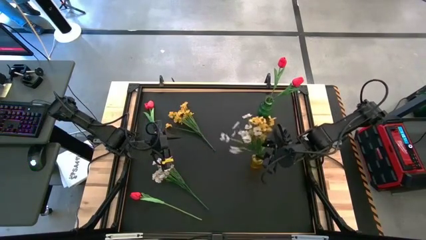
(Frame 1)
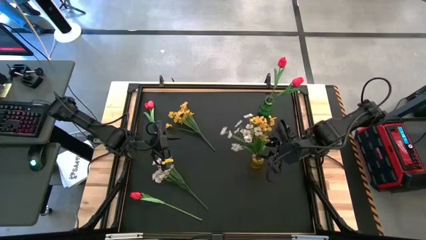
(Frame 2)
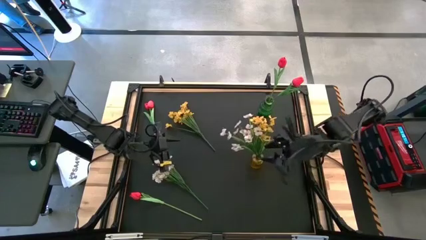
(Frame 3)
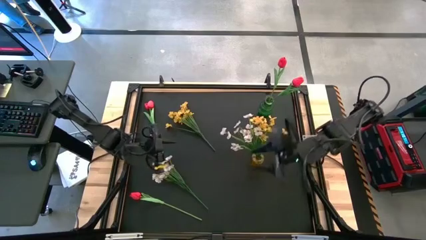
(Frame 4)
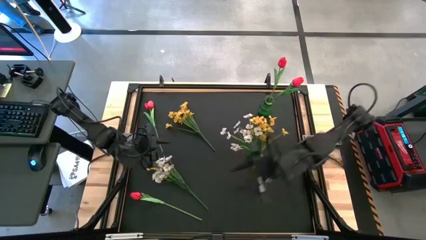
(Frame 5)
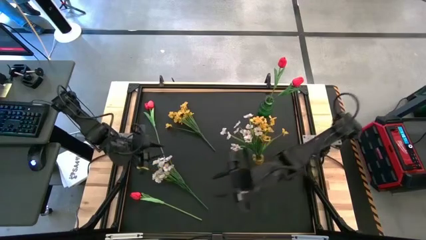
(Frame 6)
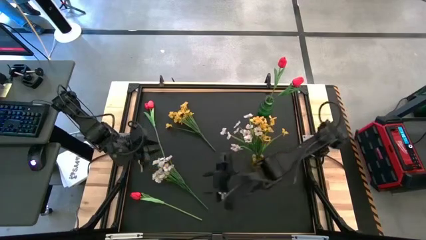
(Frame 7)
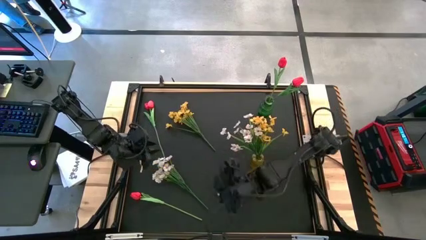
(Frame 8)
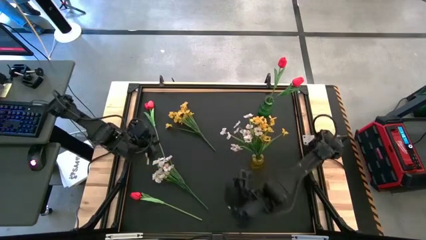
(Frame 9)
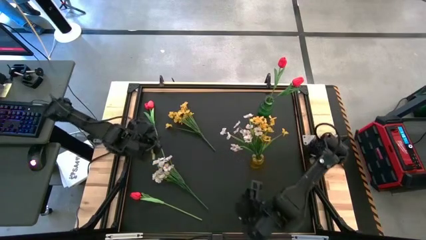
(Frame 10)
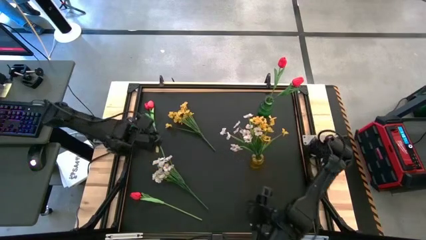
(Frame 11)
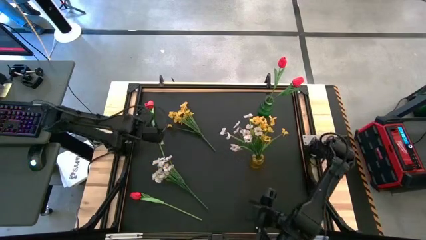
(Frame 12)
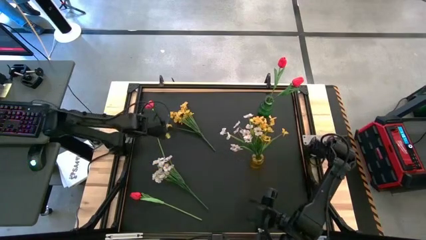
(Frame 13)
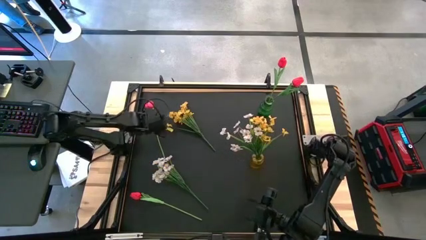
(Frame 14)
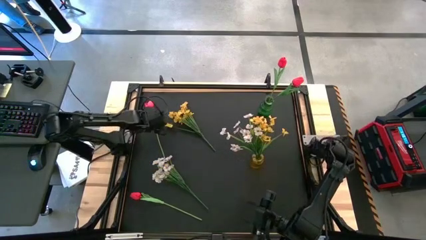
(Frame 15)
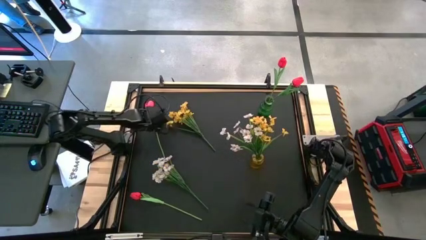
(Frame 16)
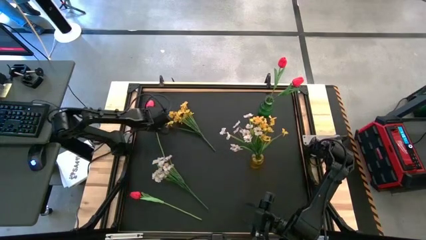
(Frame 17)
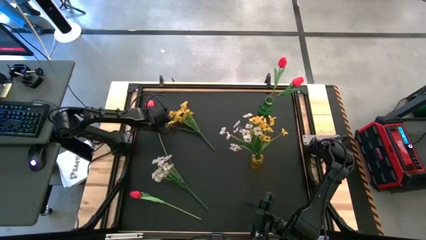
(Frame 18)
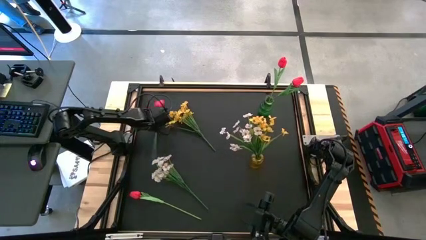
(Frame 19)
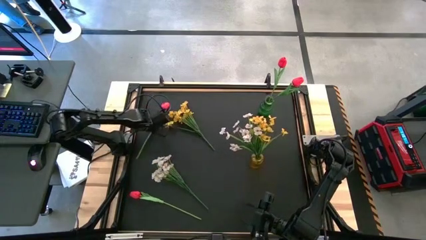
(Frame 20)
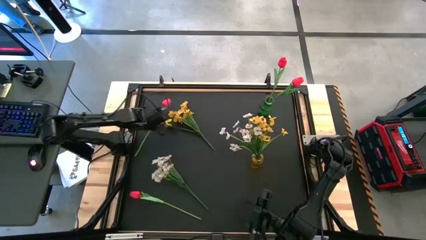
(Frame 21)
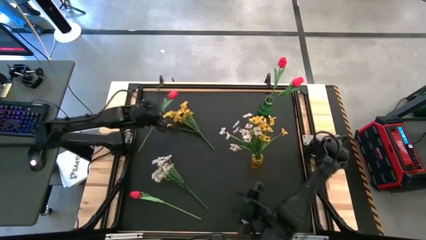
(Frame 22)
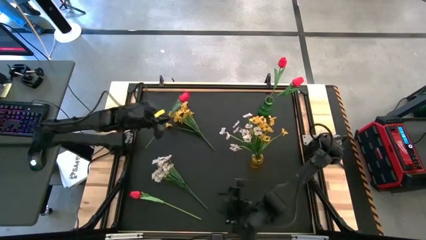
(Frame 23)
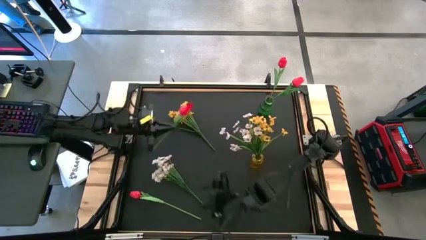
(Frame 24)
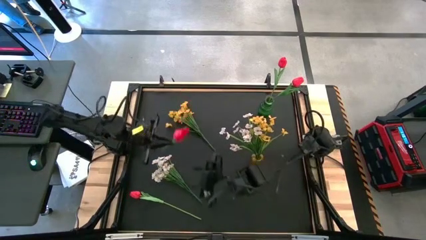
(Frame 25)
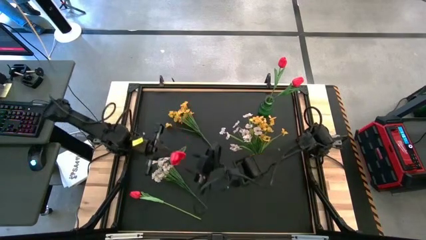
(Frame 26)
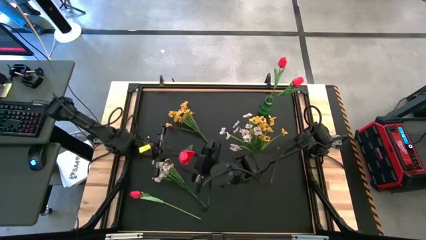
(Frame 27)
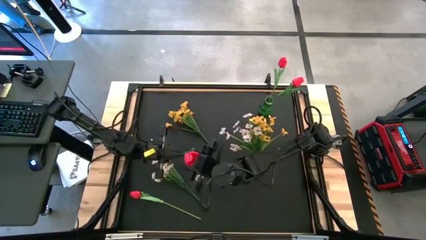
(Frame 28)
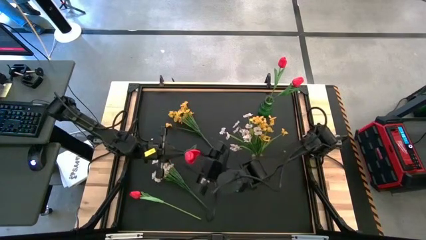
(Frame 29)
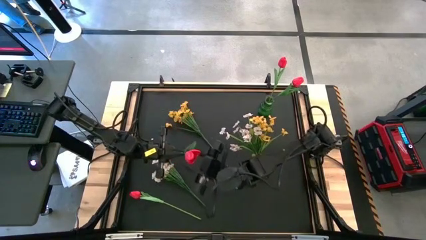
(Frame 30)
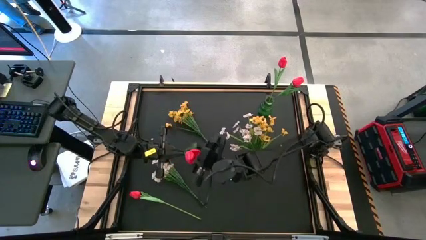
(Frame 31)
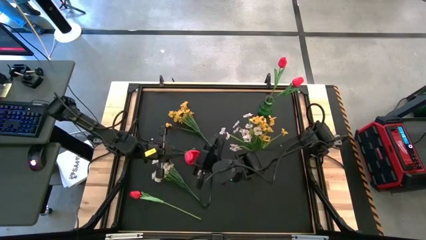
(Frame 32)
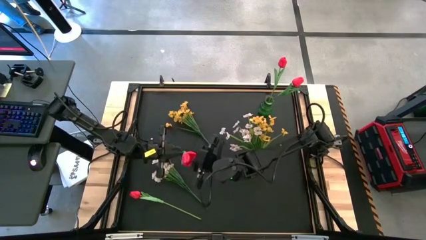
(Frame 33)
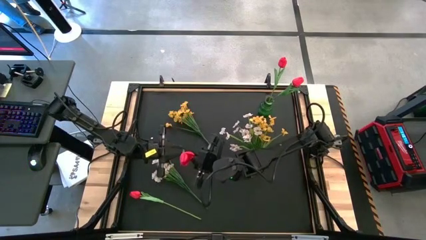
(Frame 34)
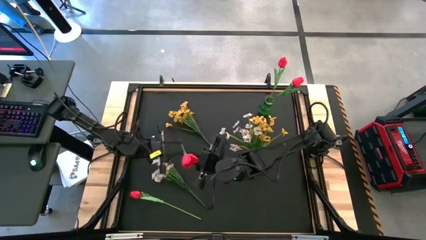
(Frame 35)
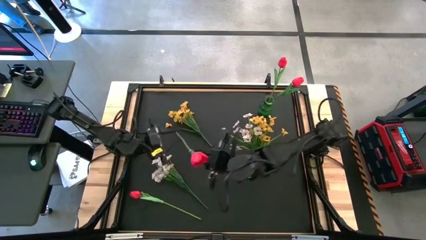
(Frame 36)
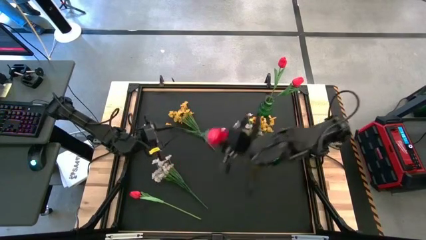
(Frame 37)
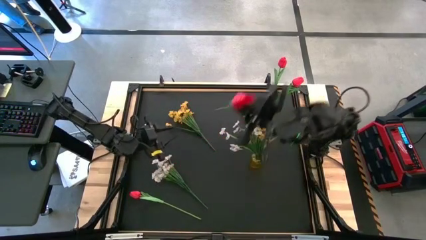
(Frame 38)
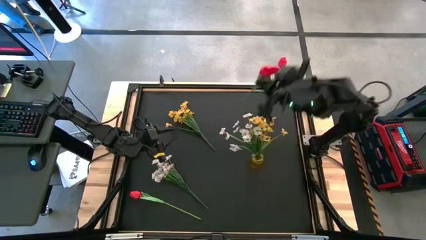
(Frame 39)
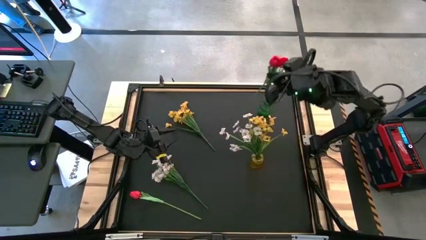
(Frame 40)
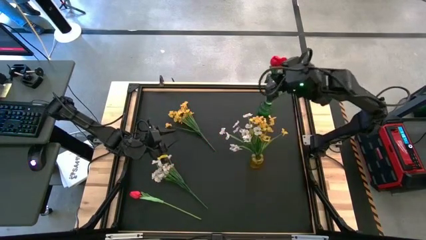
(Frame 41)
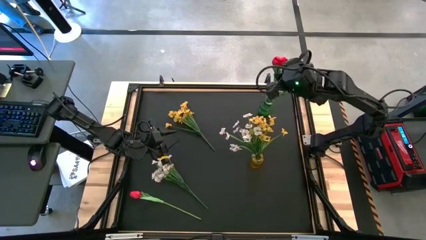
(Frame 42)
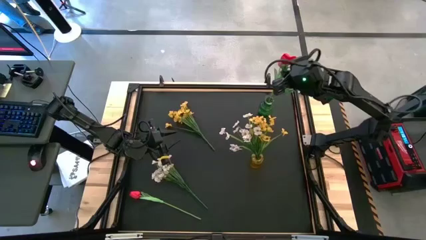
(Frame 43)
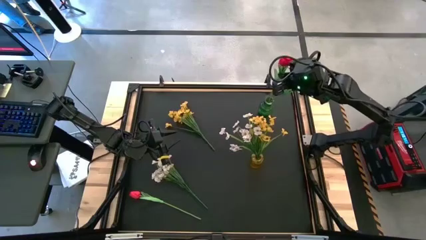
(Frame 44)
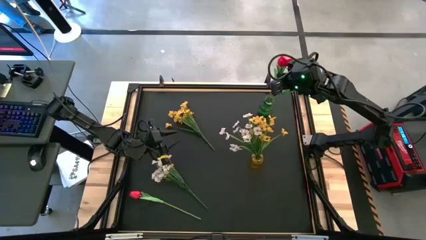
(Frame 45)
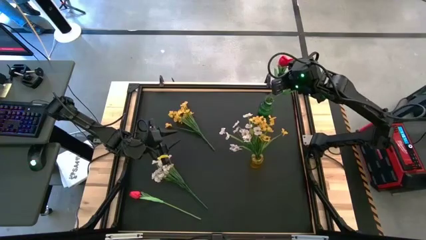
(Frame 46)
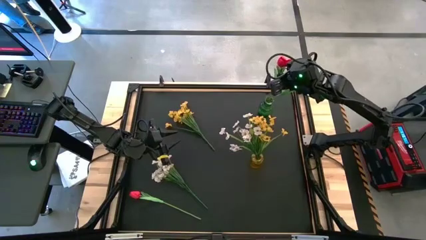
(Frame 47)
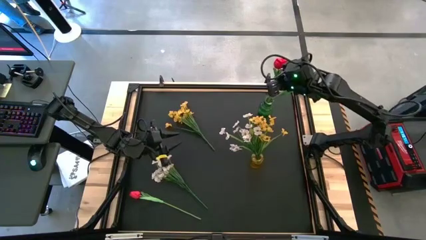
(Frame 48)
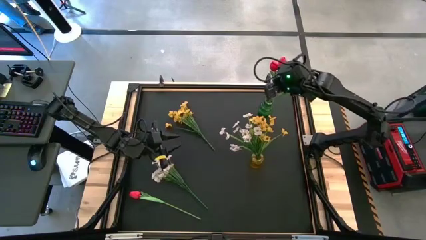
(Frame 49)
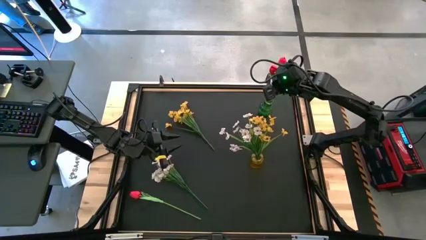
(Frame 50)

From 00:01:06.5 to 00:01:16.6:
Task: Sort flowers into vase by color
Put the top red flower into the green vase

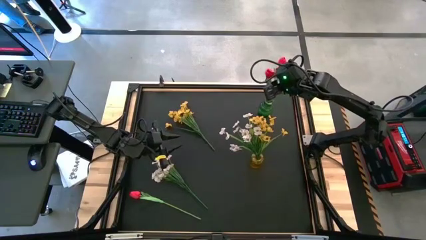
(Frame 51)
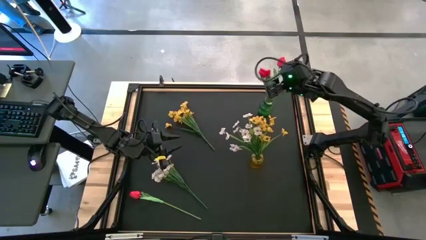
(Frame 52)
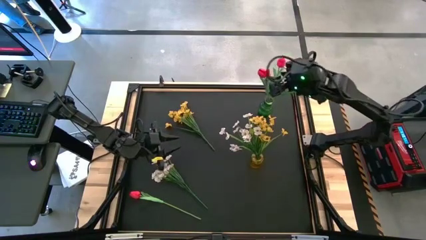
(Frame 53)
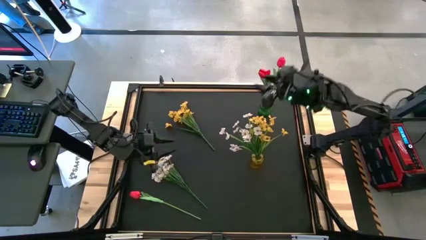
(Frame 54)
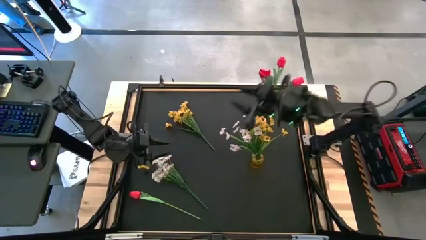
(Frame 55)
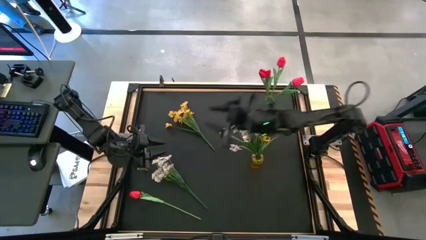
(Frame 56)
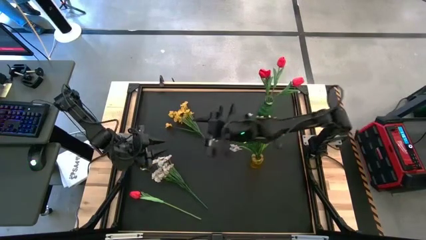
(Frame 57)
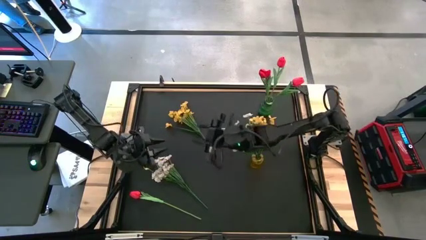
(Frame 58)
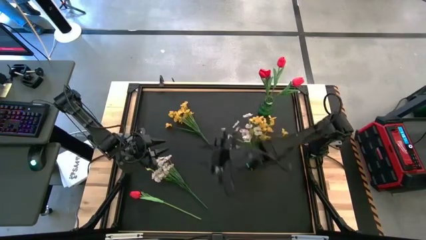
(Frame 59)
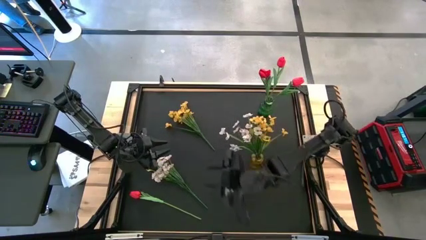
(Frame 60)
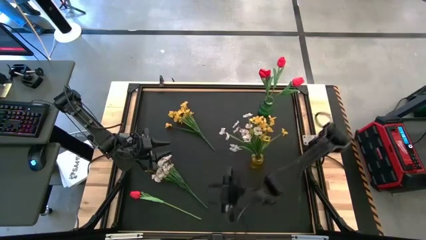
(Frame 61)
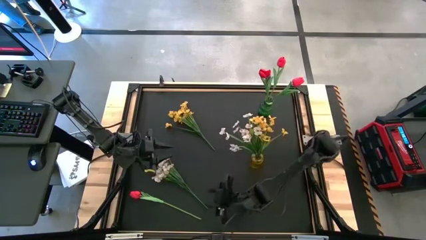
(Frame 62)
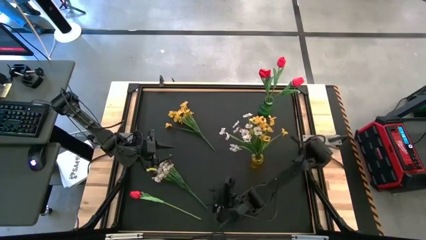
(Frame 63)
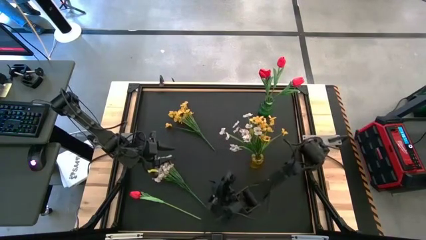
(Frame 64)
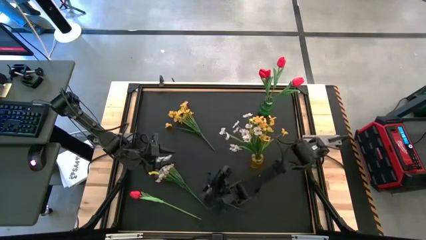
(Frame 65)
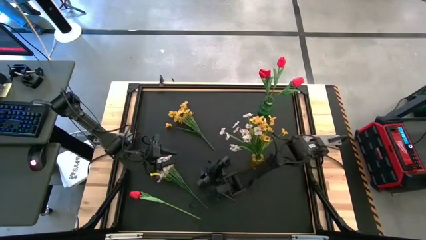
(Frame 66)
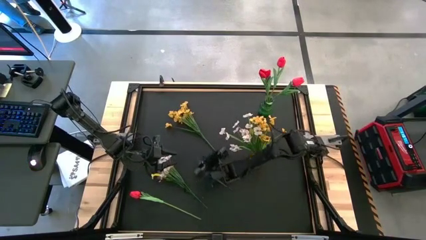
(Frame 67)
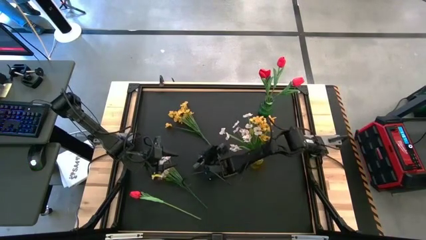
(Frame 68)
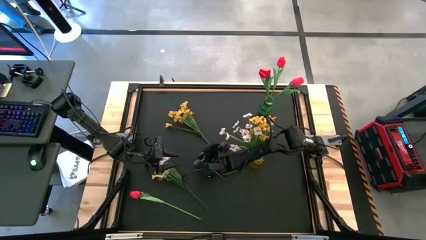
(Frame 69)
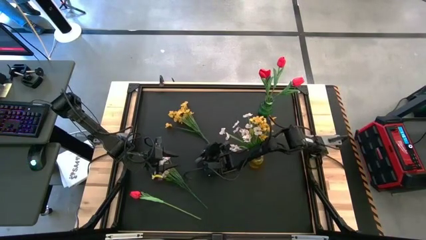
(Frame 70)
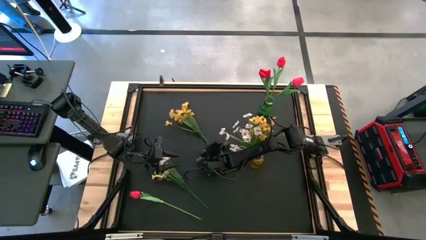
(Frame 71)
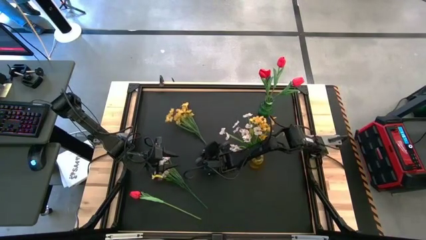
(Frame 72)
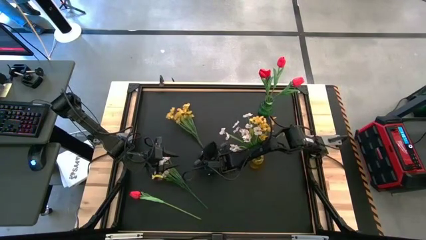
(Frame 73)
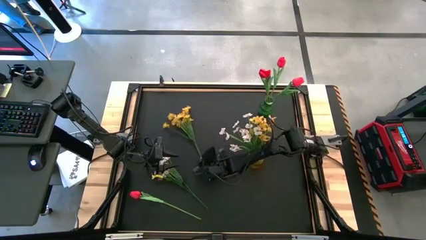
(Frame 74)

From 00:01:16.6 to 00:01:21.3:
Put the yellow flowers into the yellow vase
